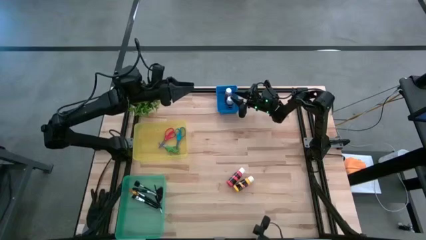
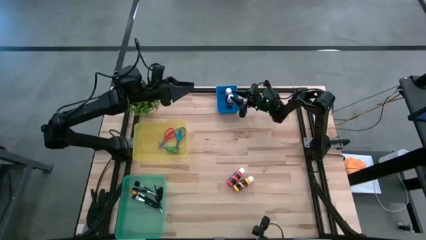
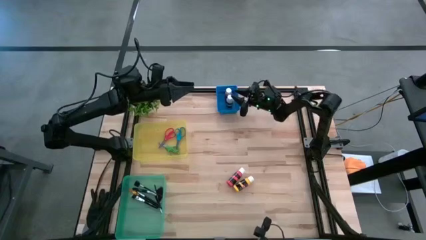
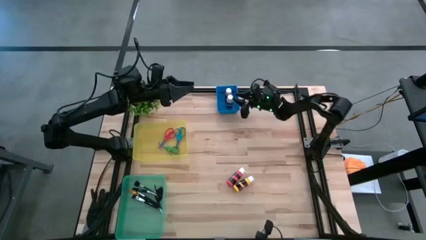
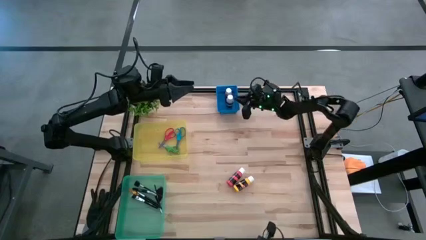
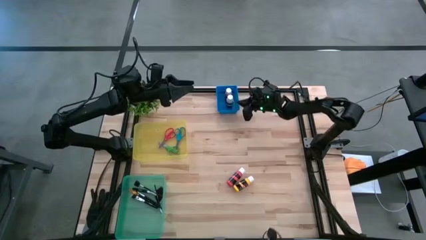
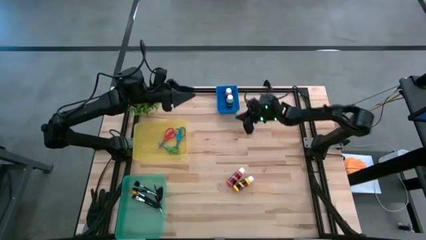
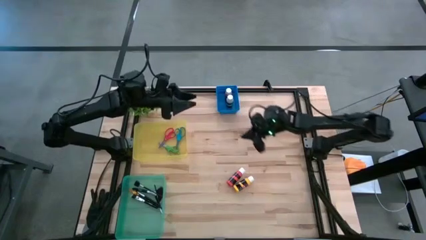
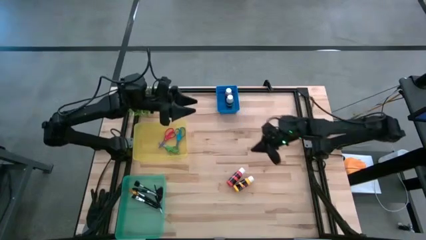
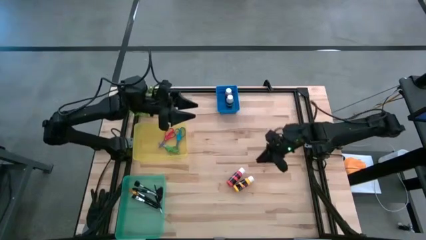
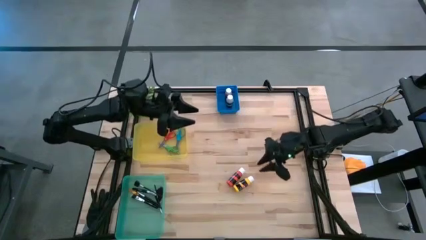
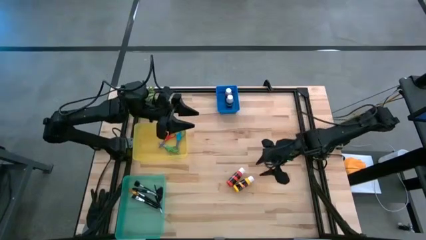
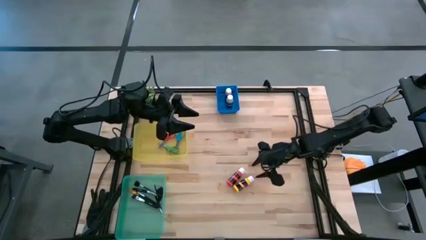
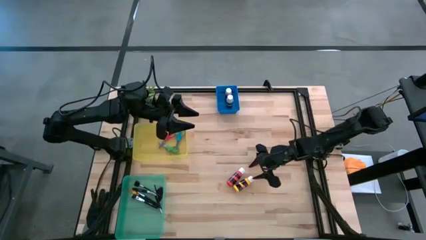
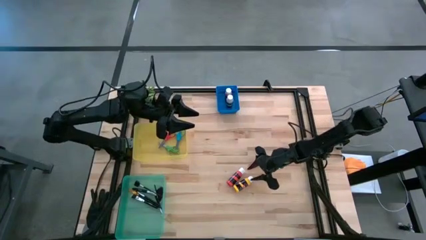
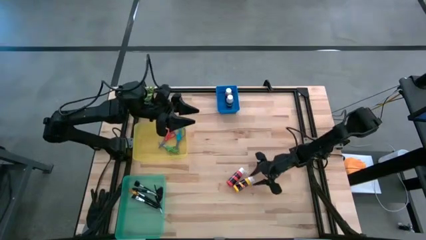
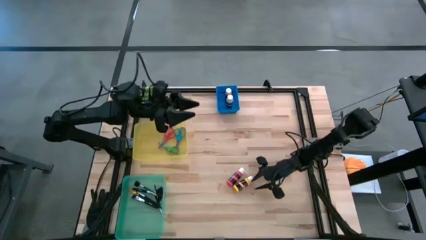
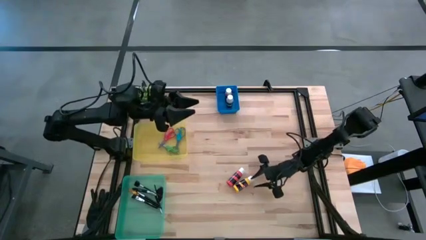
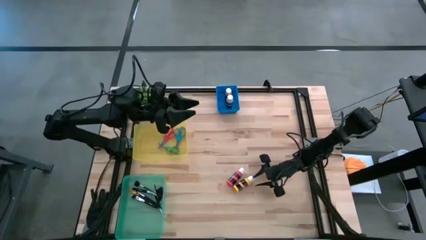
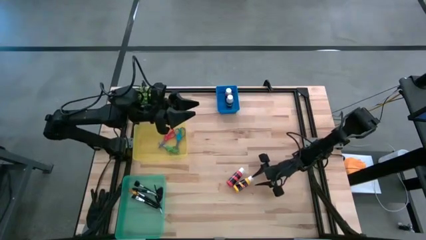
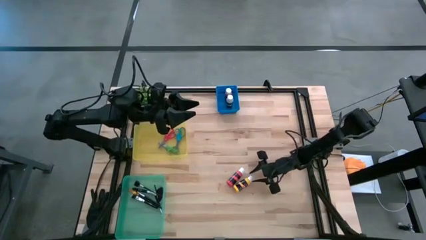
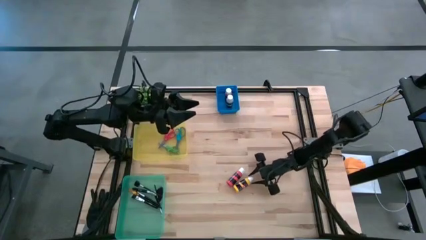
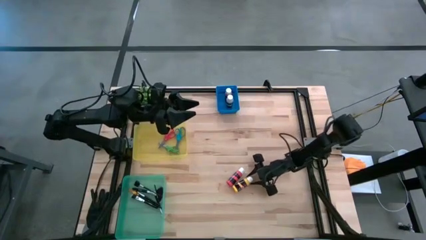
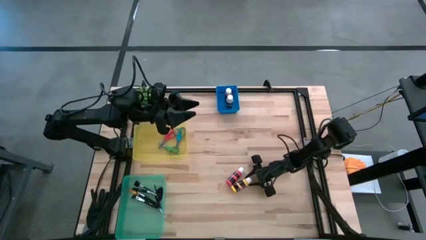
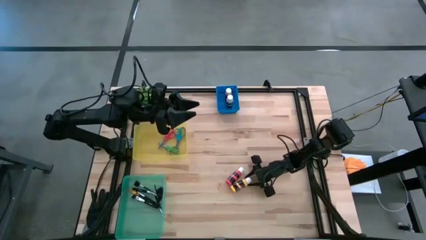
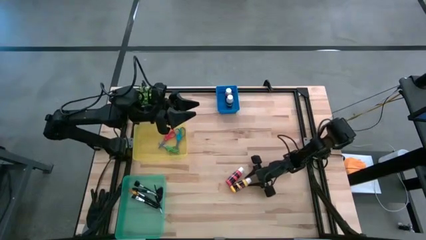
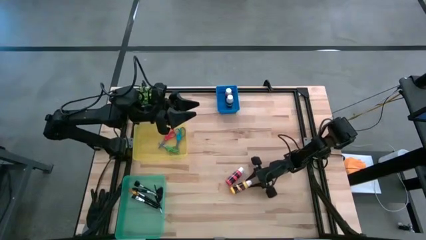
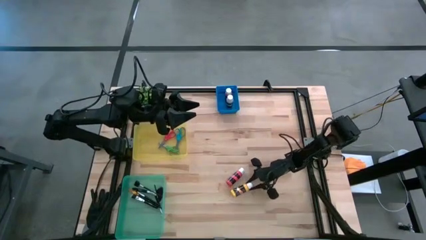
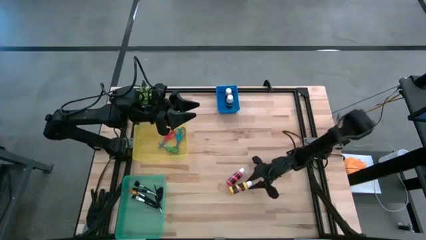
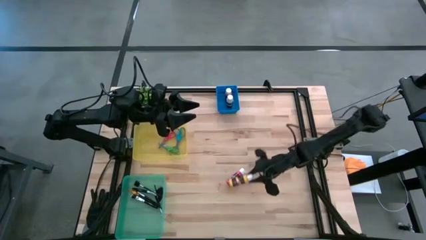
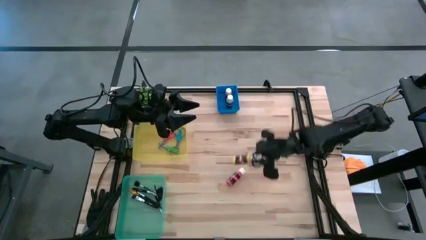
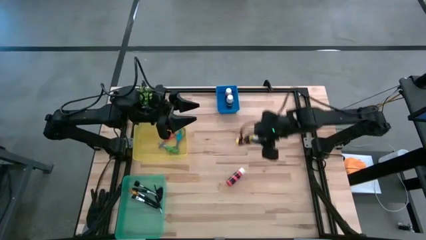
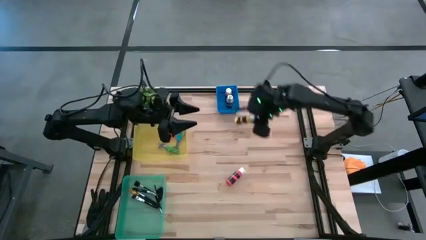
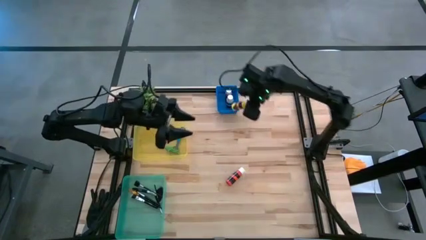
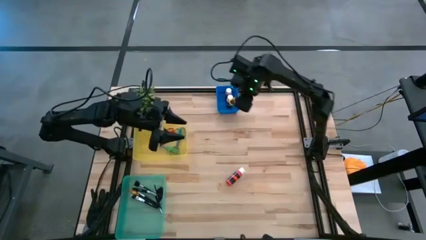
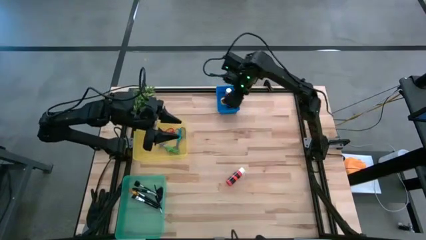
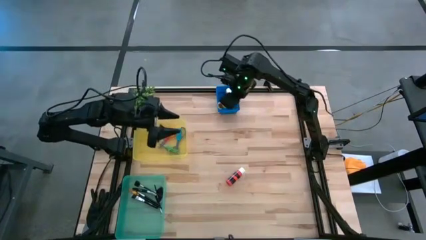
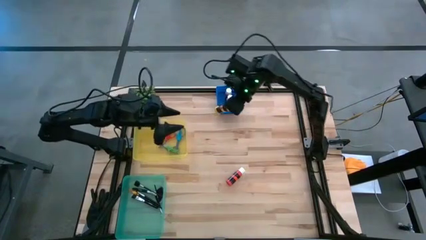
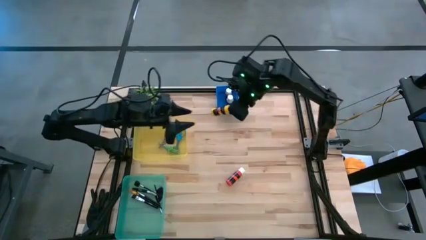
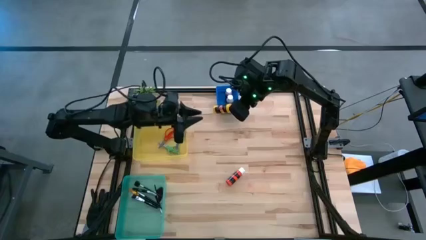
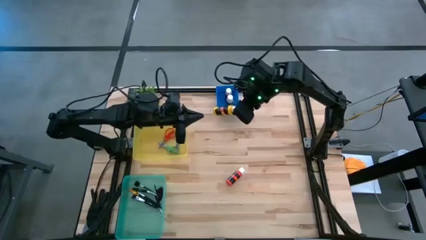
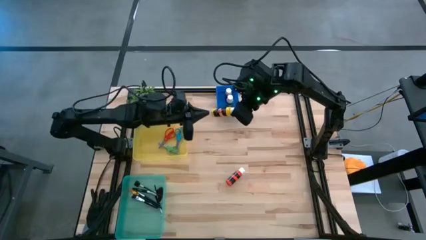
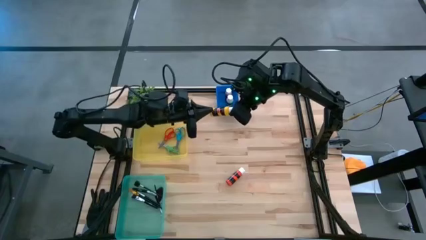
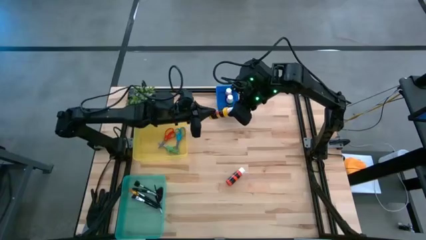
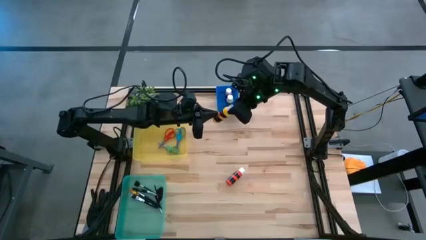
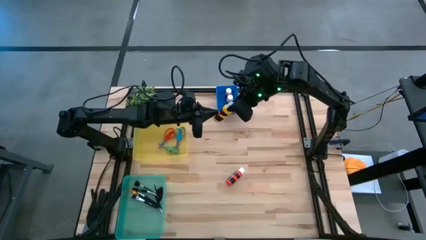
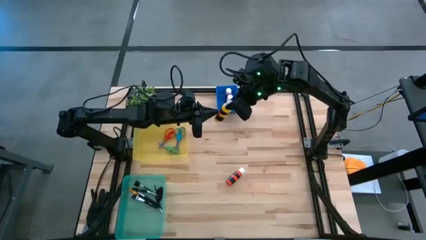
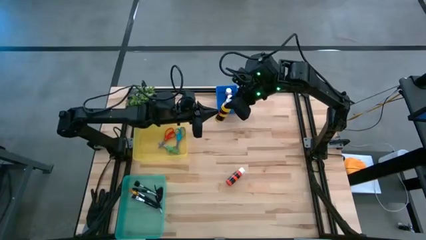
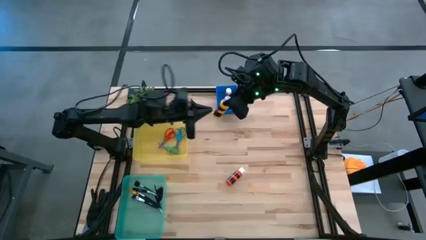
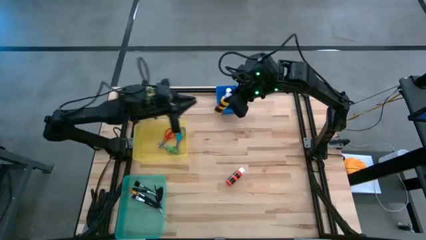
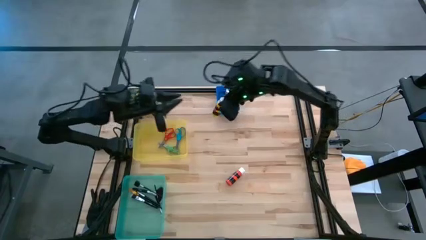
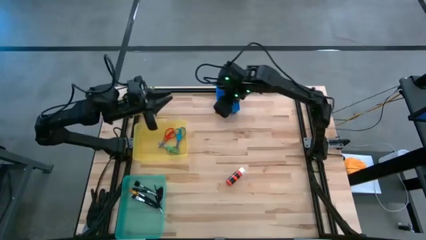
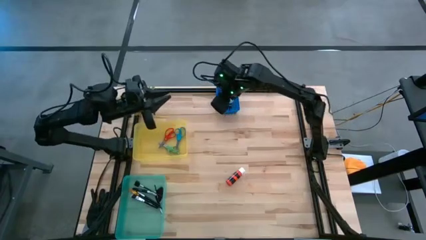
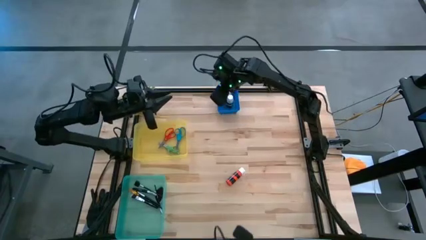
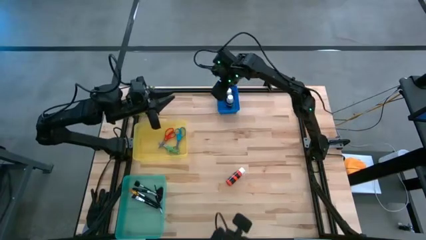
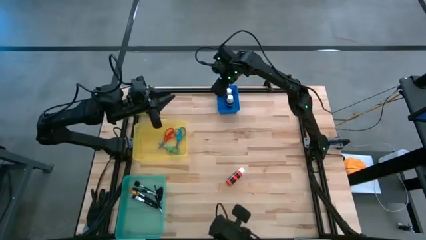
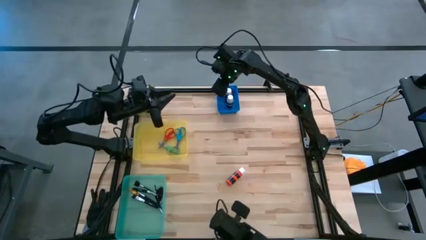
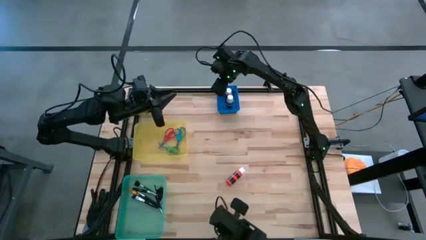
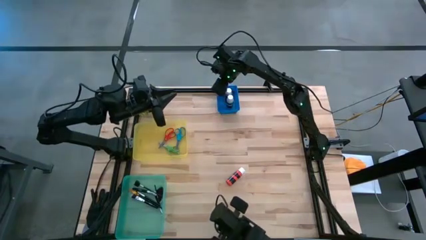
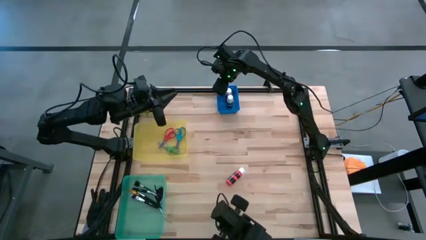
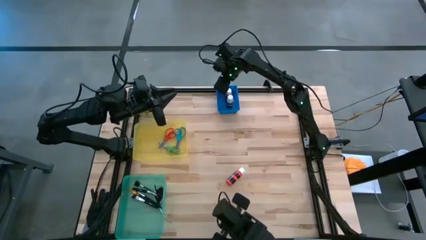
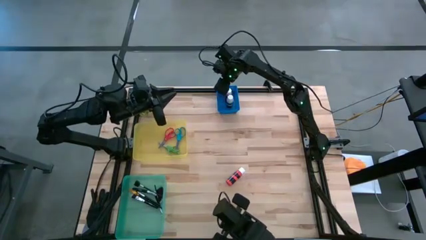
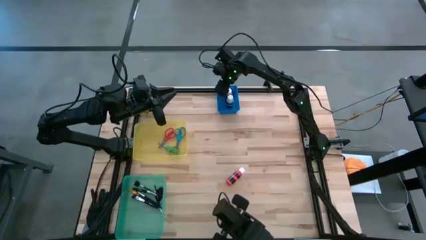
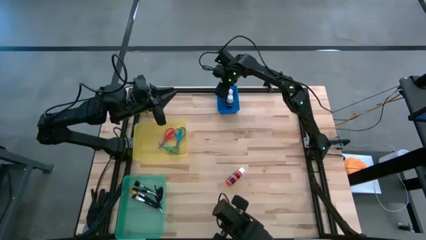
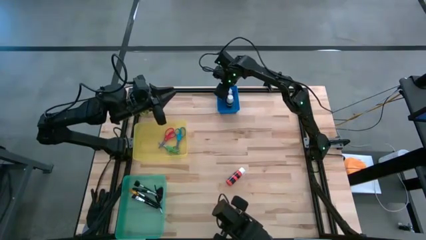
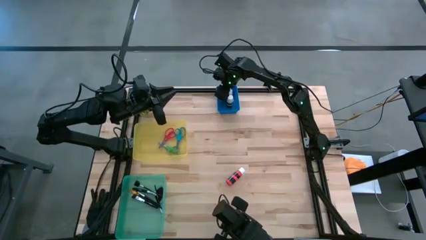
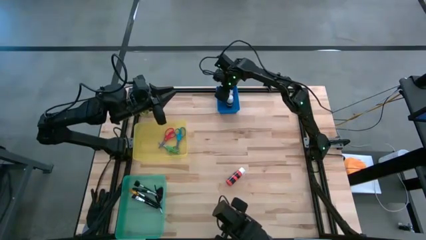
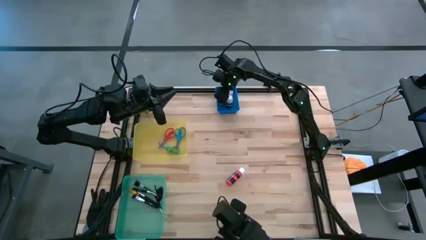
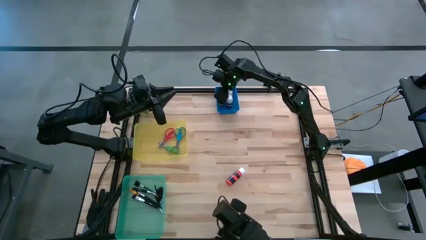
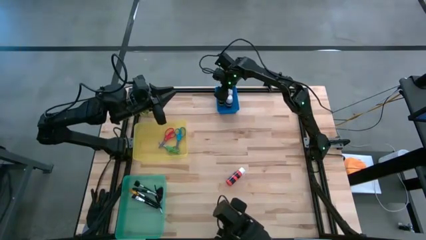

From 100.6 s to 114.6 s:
Task: Pick & Place Paint Supplies
Put the yellow paint bottle into the blue bin

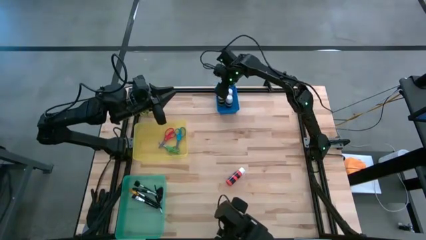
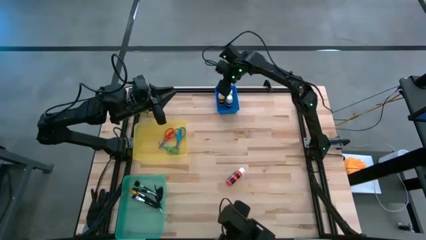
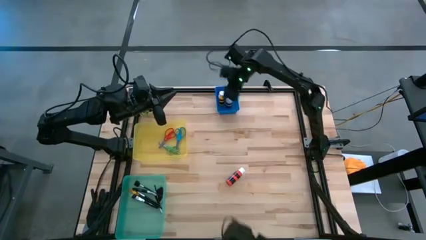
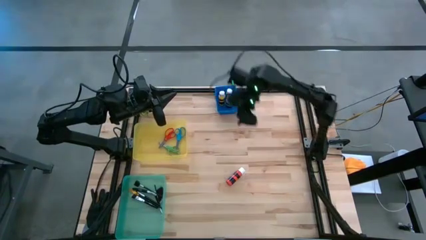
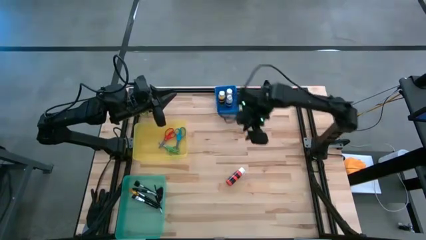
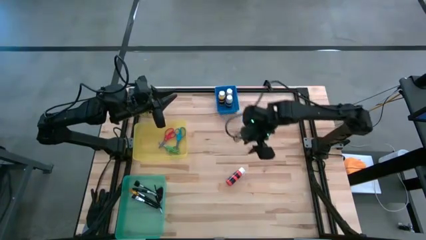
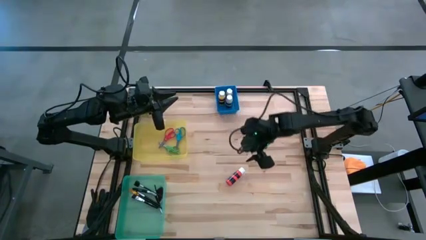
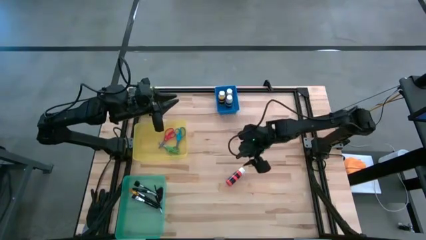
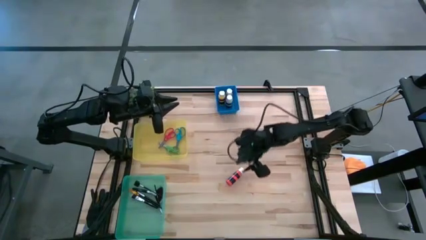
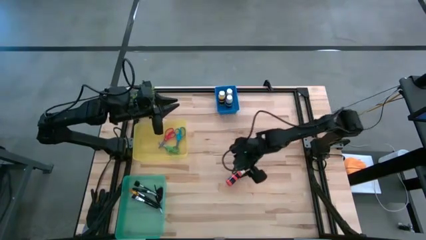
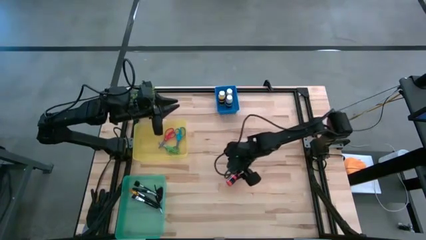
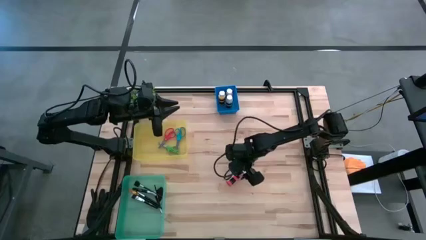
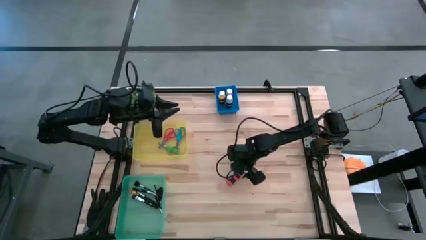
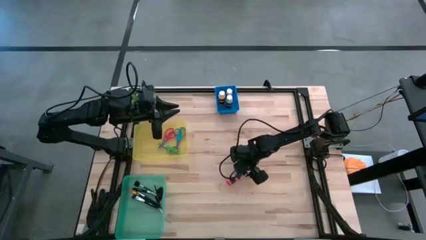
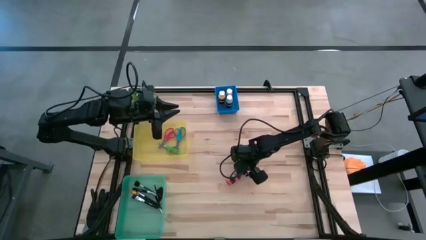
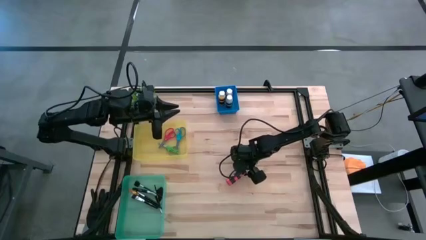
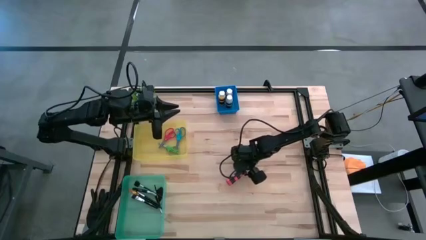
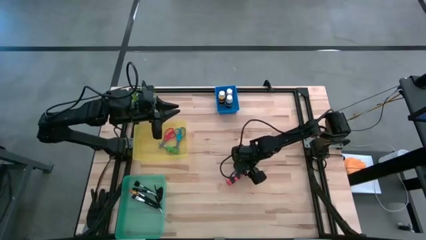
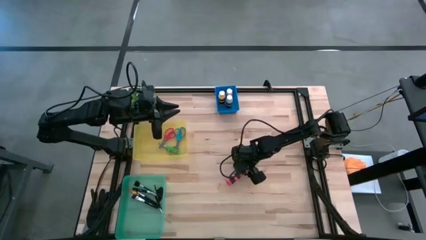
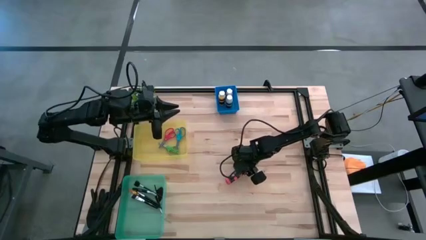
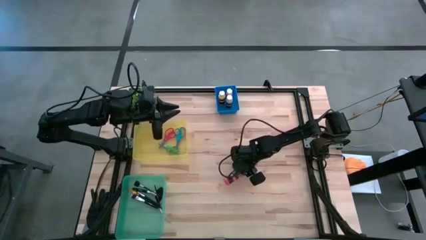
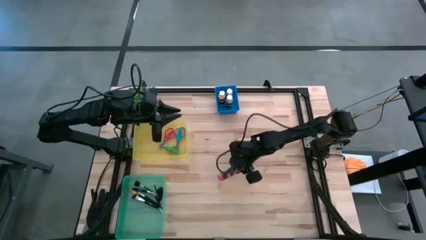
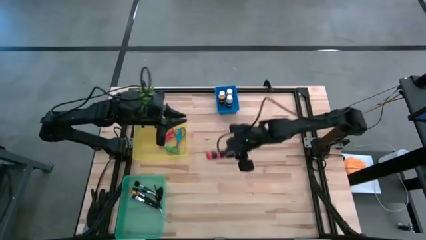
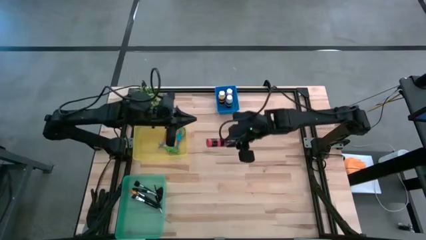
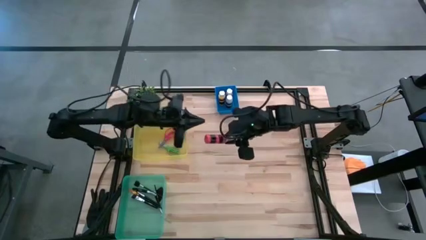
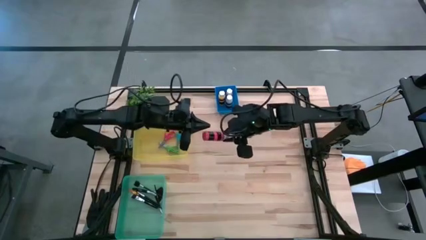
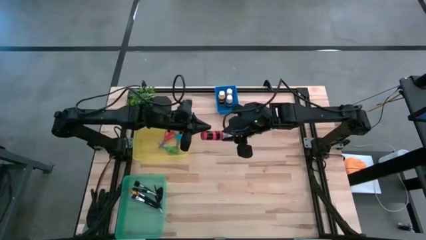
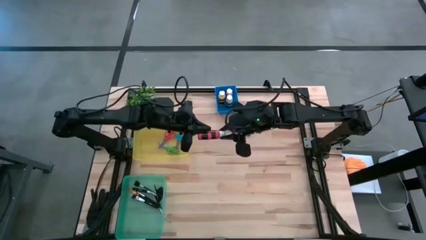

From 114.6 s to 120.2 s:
Put the orange paint bottle into the blue bin
